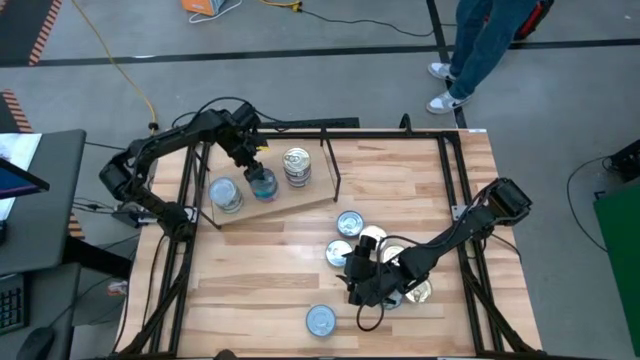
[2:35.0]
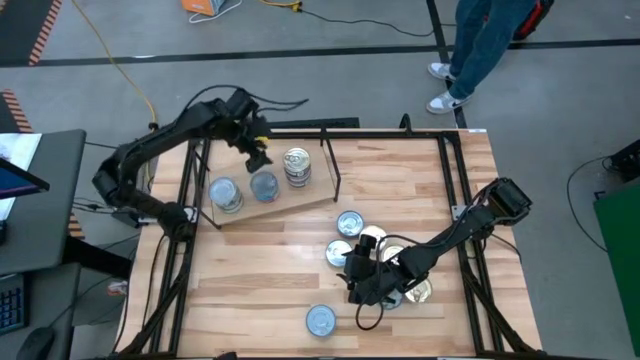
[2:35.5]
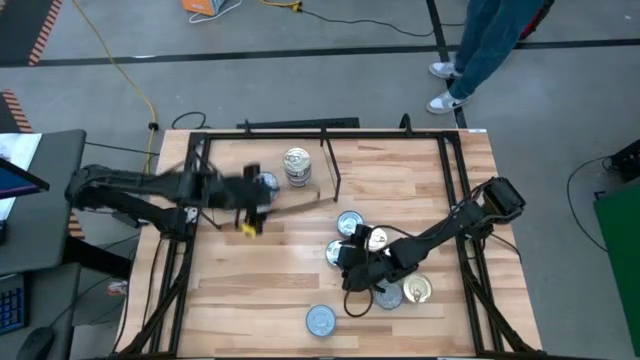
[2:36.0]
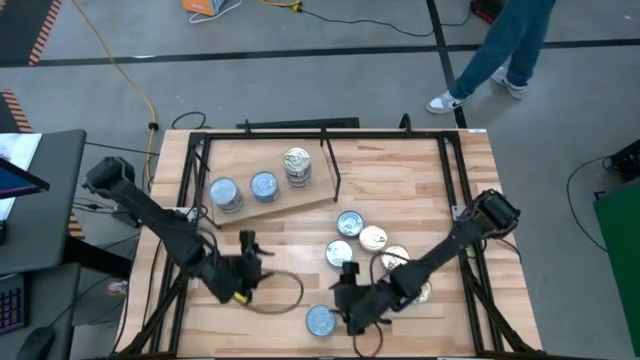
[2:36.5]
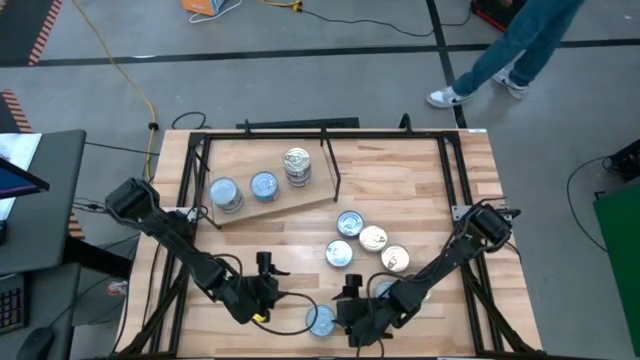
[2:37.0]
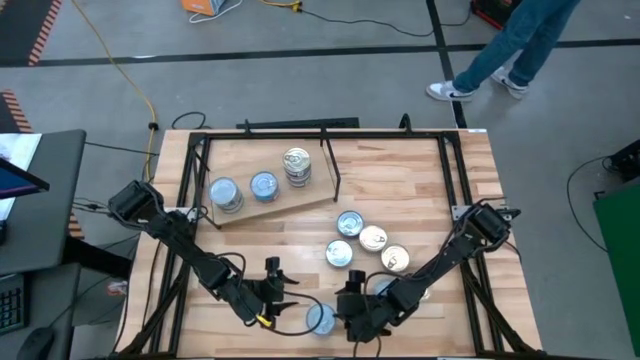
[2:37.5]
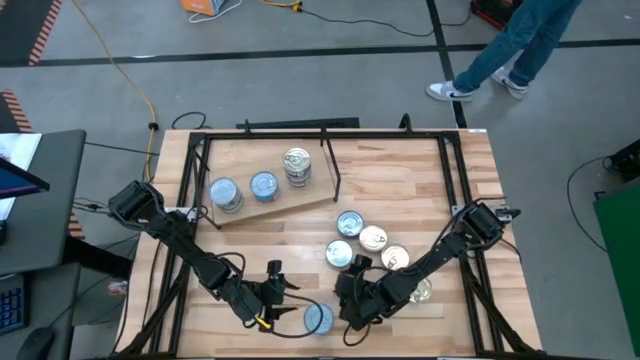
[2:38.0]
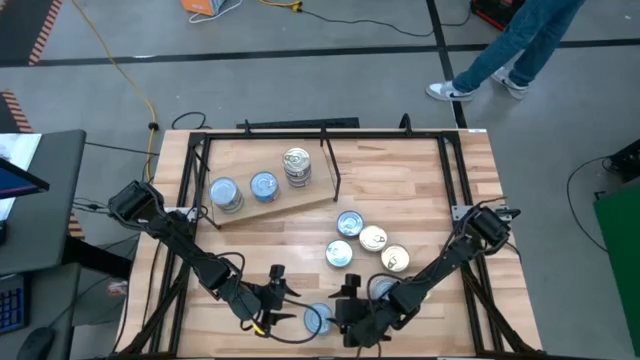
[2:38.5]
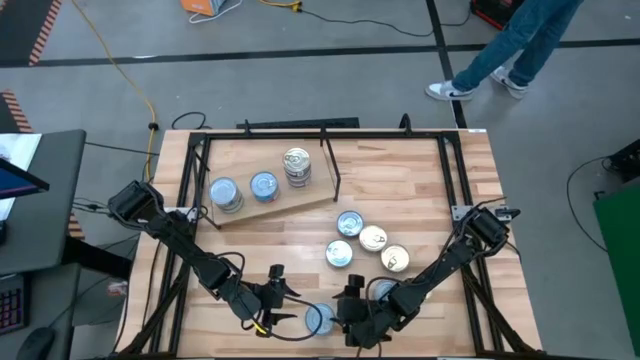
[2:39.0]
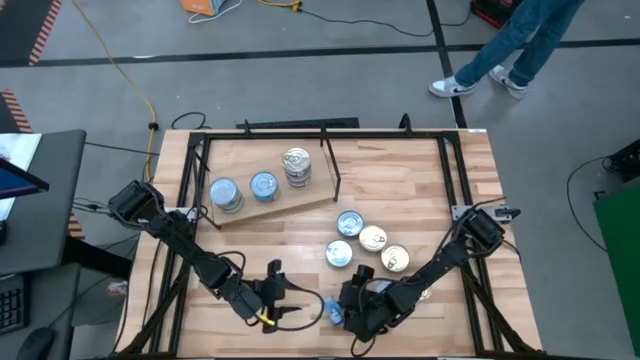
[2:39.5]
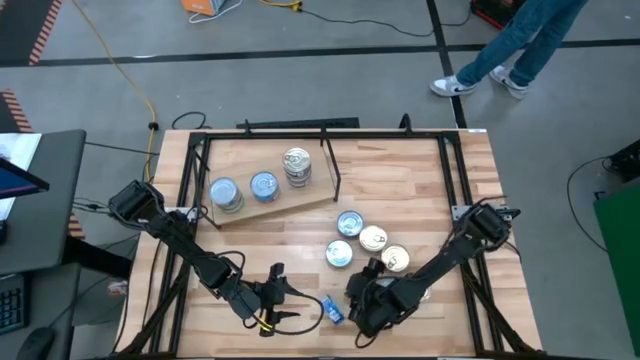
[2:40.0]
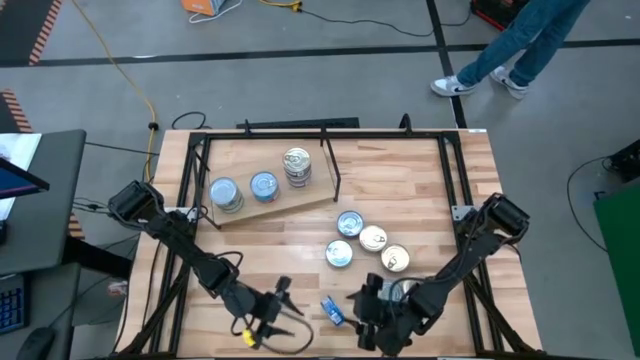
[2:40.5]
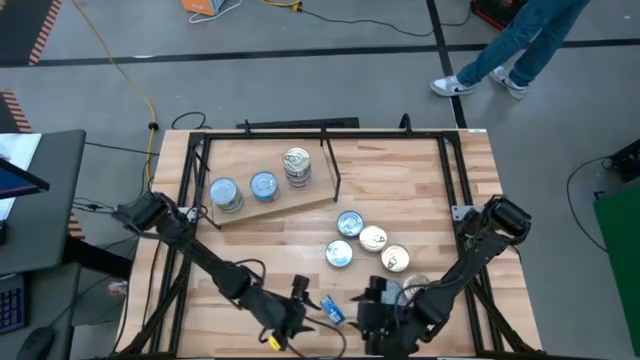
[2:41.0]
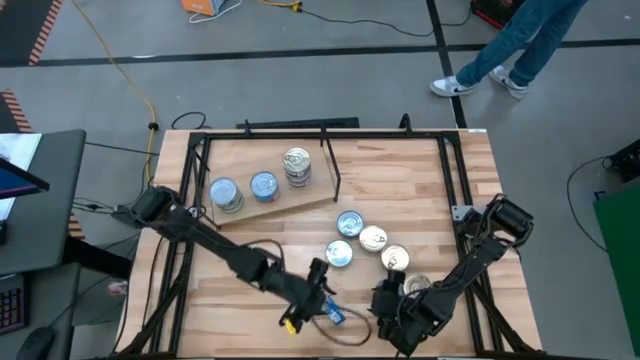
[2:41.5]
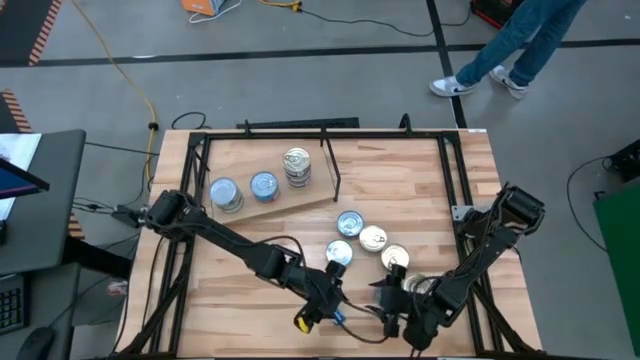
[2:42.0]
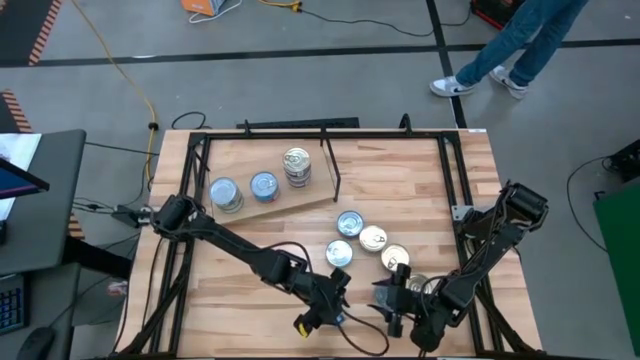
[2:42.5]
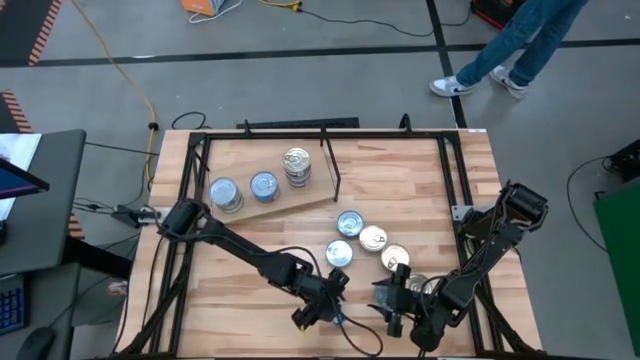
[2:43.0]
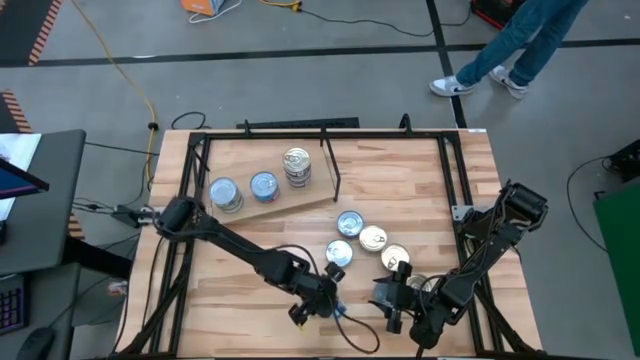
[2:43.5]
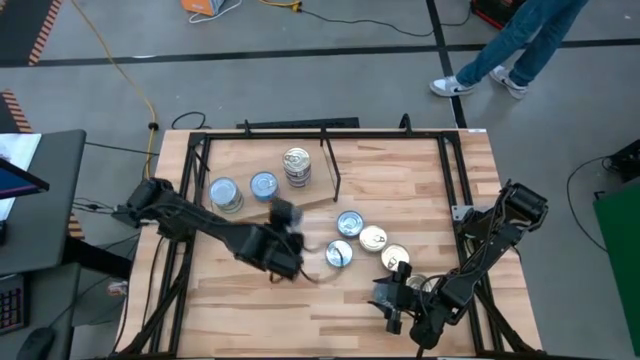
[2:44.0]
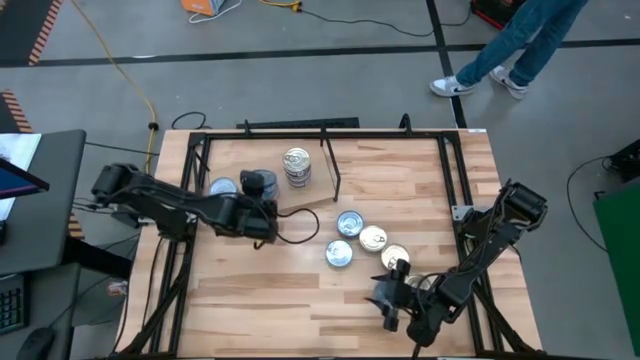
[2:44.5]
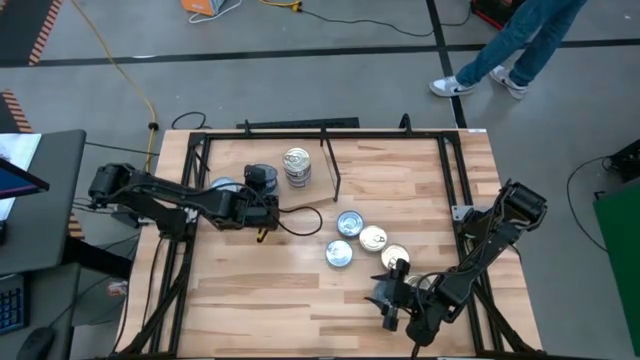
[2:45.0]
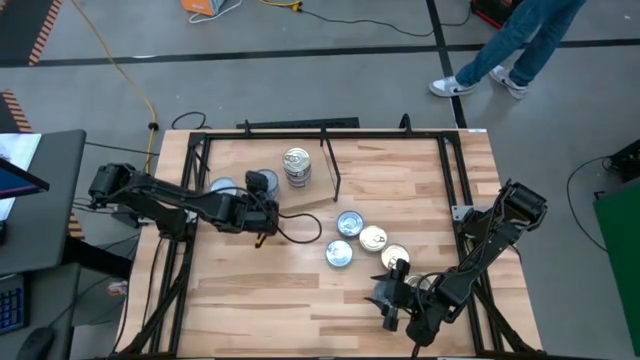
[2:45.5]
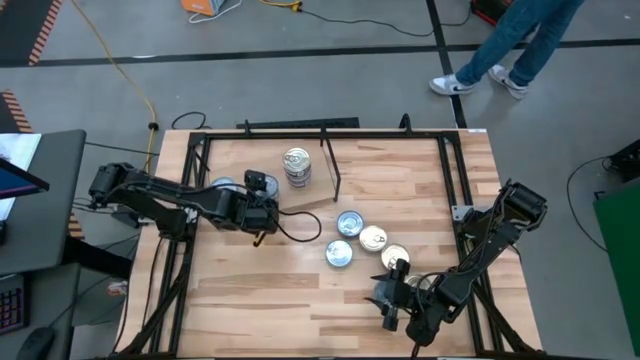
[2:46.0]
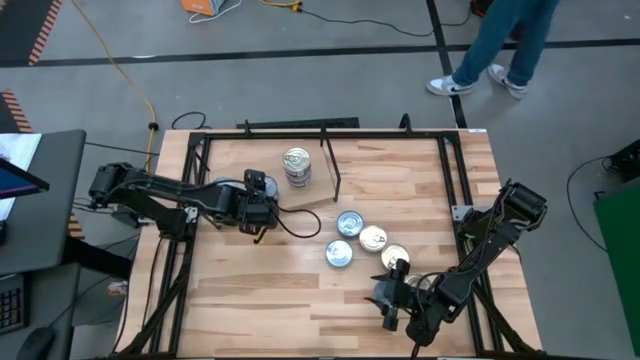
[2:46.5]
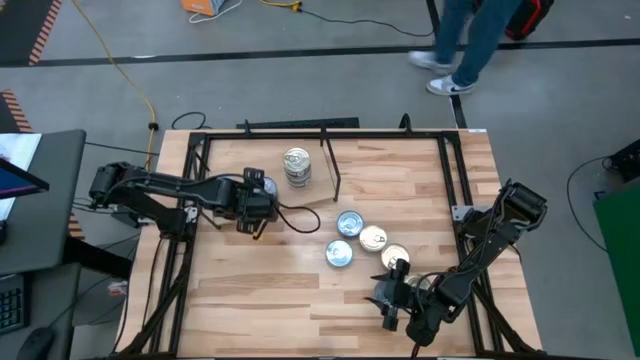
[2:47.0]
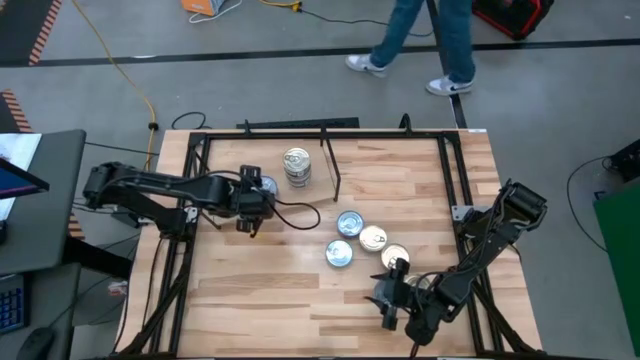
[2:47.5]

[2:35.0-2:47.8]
Task: Stack canned seafood by type on shelf
Stack the blue tuna can on top of the yellow blue tuna can on the shelf

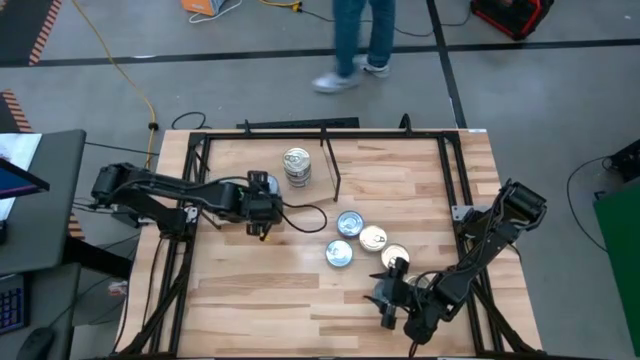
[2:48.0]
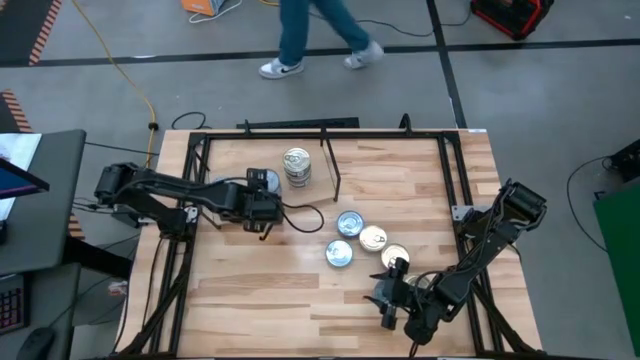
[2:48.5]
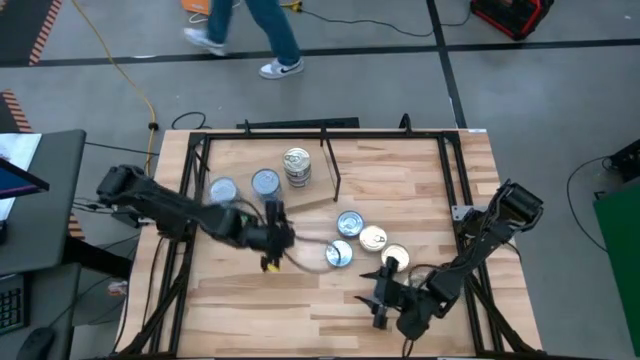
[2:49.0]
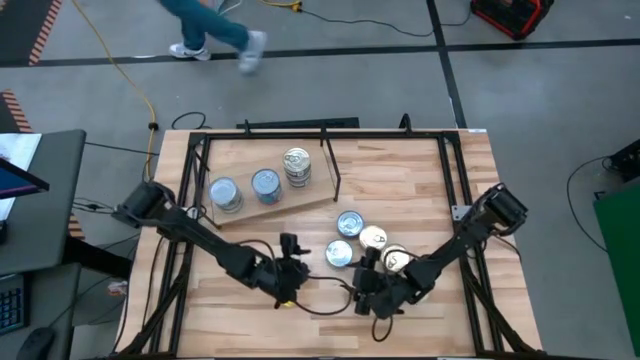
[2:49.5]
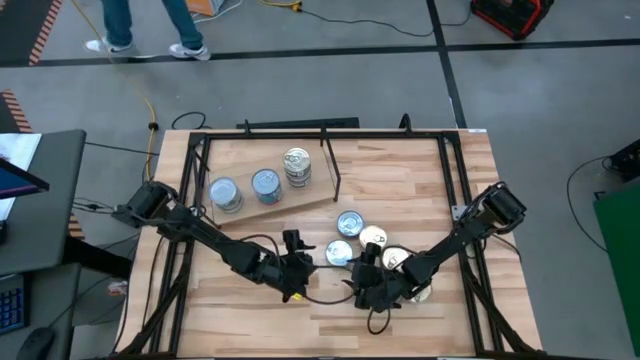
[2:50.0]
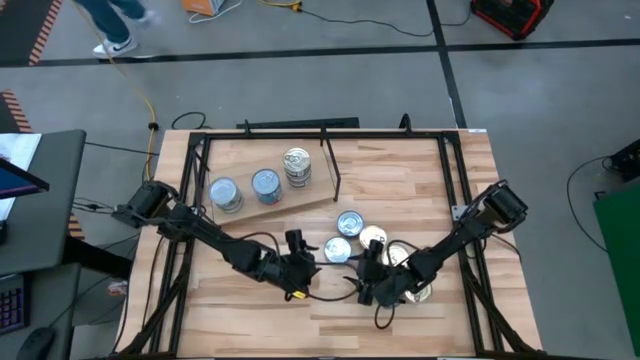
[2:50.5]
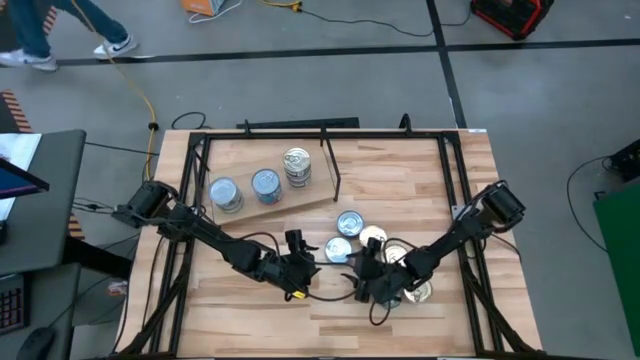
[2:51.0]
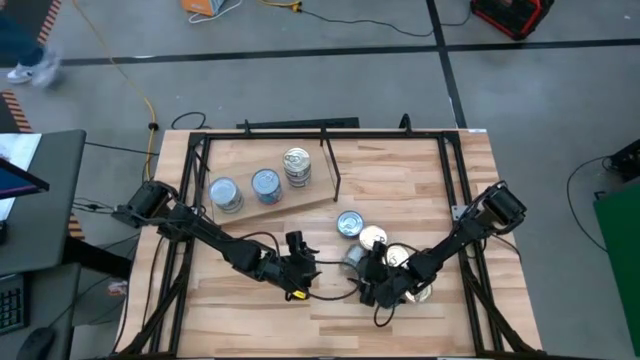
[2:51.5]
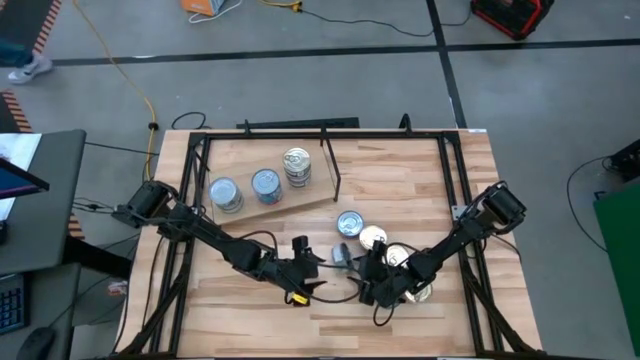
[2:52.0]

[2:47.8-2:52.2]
Stack the green tuna can on top of the blue tuna can on the shelf

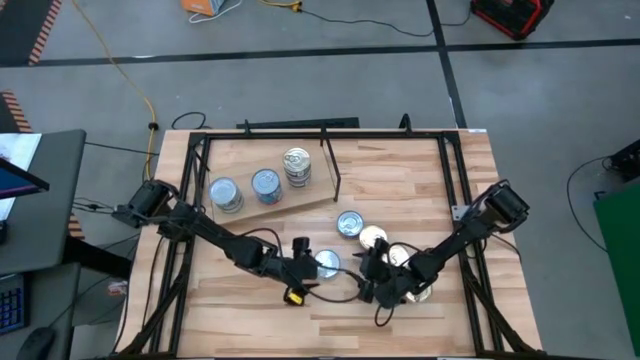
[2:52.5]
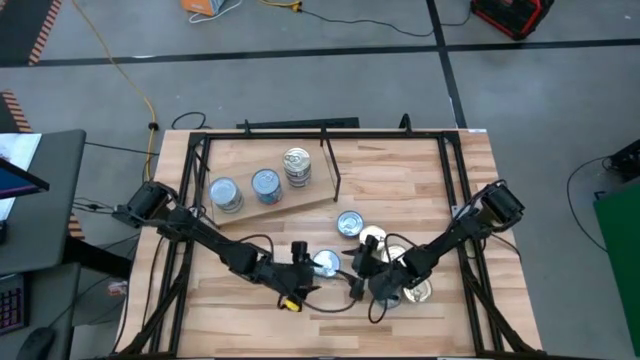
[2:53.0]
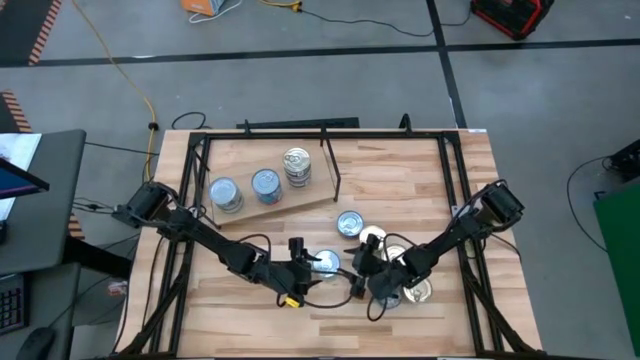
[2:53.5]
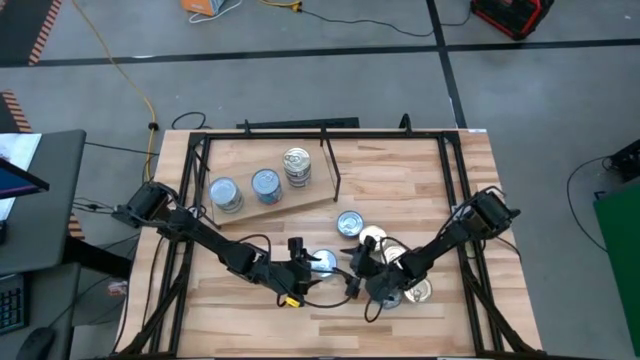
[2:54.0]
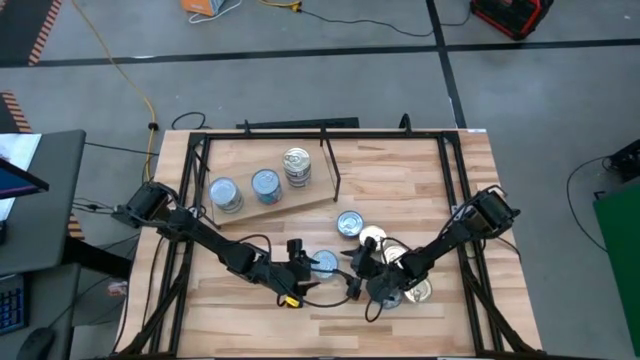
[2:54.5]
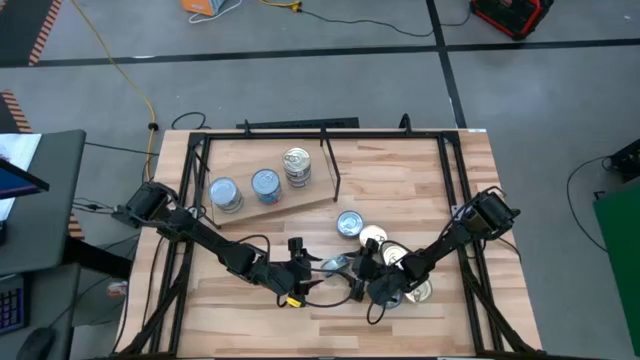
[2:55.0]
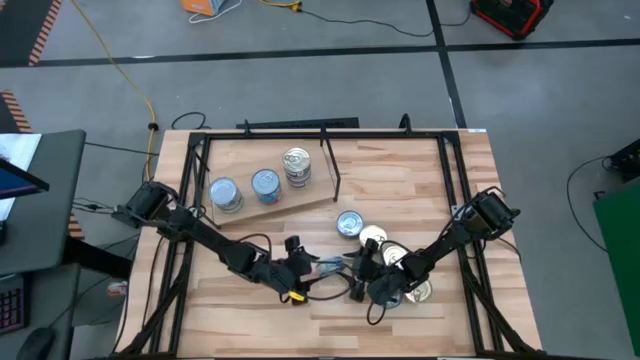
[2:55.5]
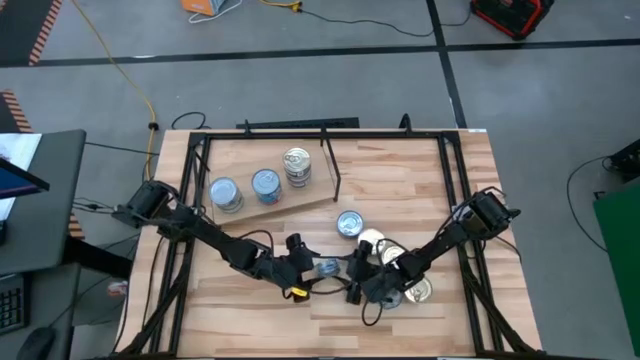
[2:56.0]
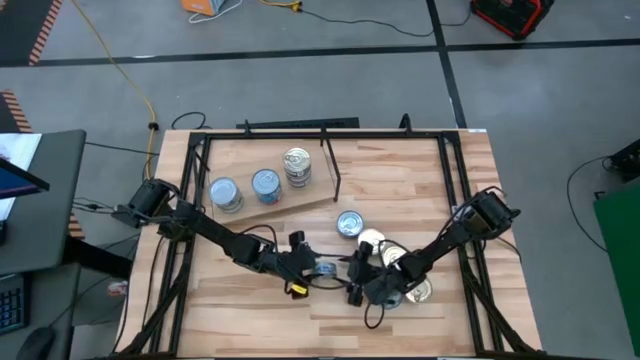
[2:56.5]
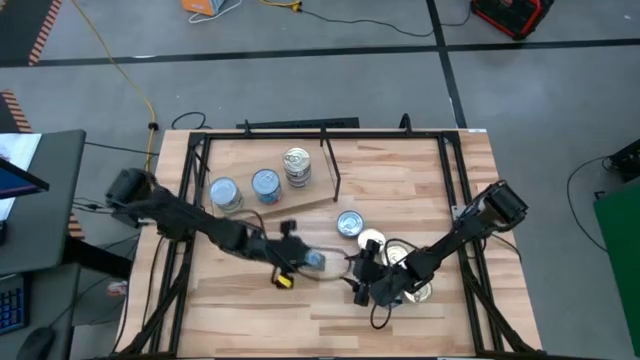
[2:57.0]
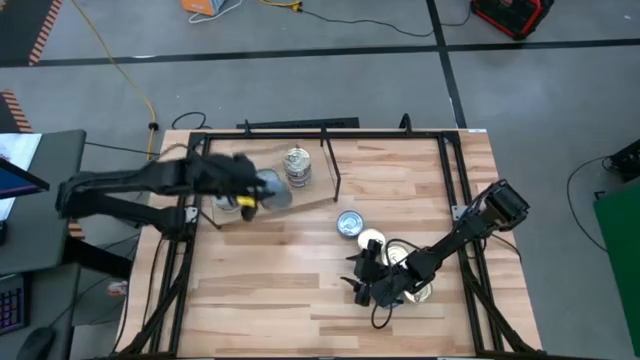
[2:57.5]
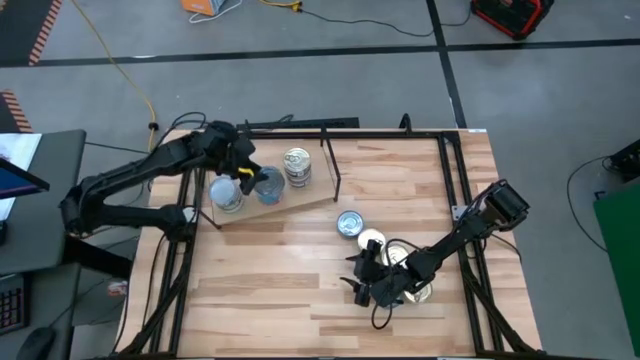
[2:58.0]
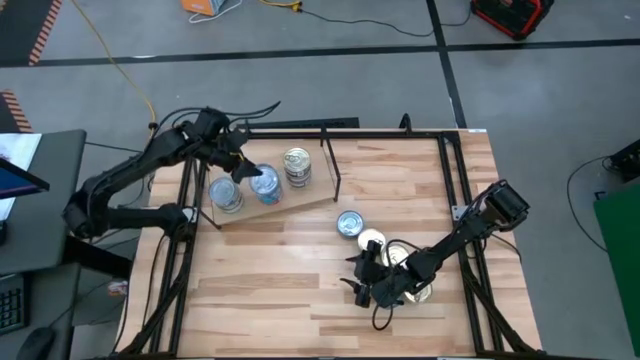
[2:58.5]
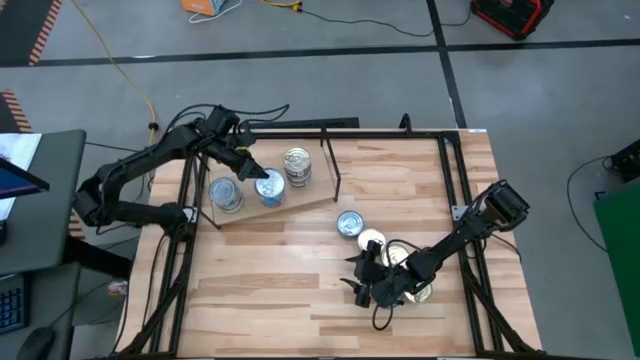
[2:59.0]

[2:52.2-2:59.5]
Stack the green tuna can on top of the blue tuna can on the shelf
